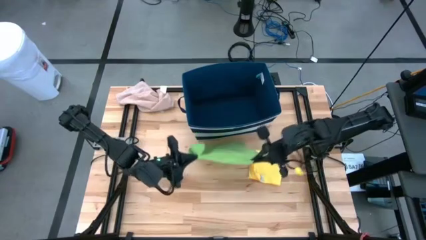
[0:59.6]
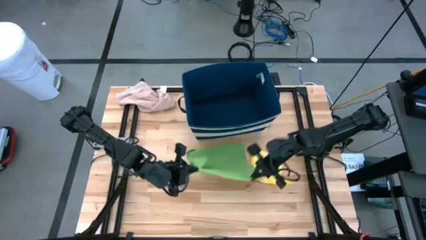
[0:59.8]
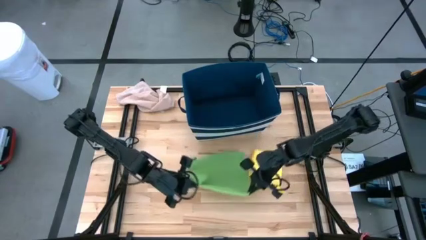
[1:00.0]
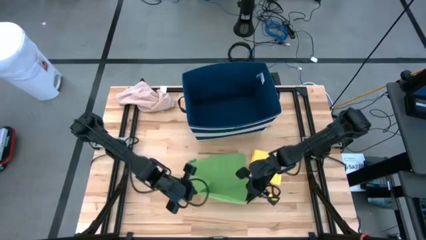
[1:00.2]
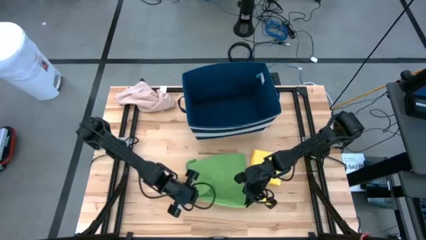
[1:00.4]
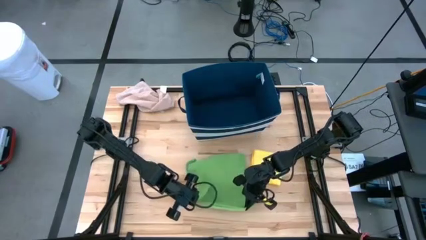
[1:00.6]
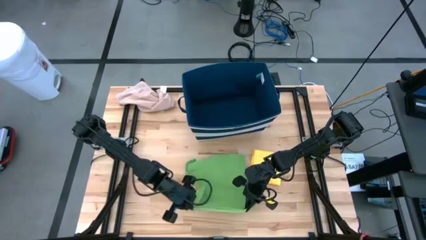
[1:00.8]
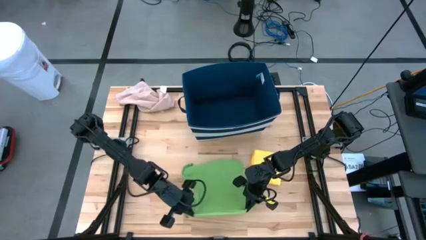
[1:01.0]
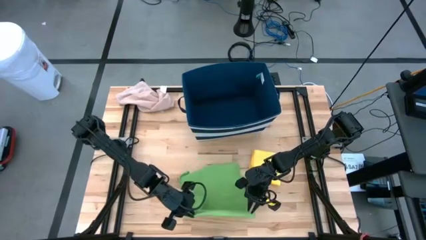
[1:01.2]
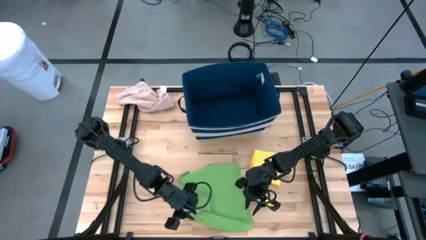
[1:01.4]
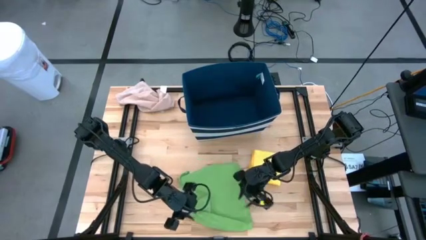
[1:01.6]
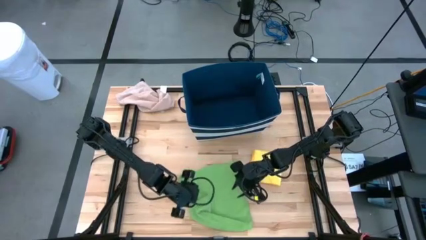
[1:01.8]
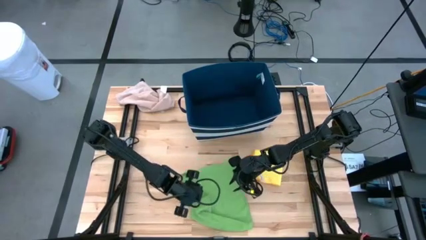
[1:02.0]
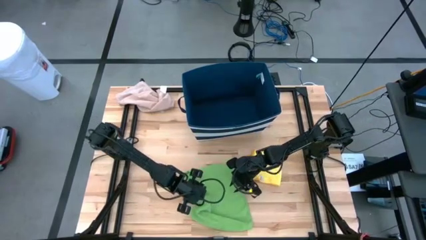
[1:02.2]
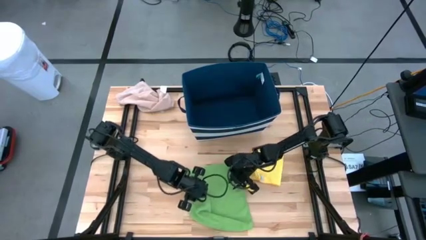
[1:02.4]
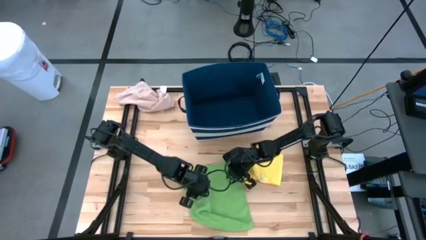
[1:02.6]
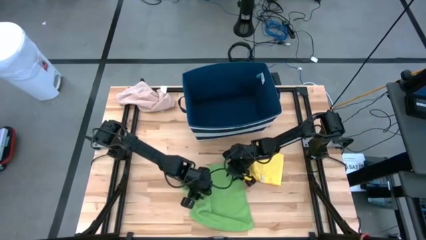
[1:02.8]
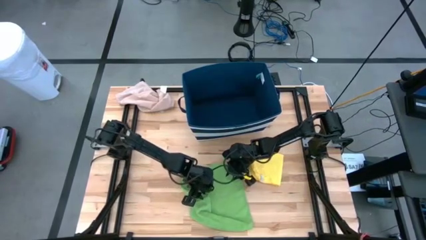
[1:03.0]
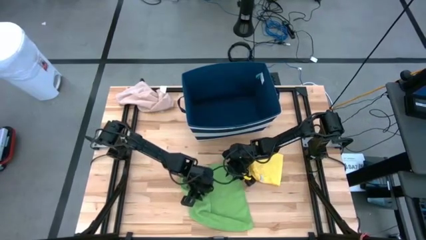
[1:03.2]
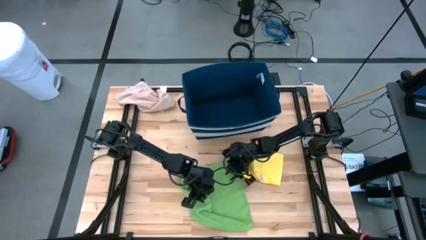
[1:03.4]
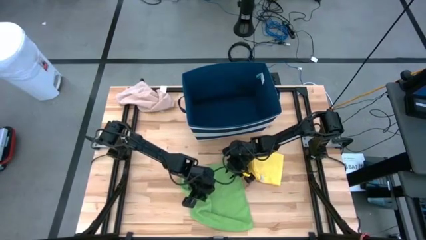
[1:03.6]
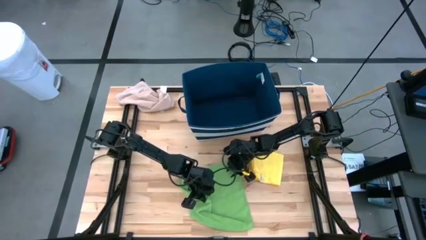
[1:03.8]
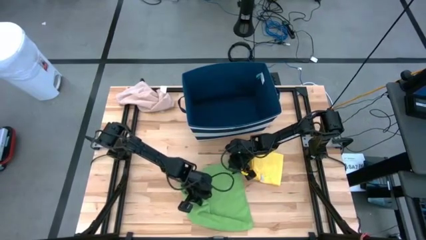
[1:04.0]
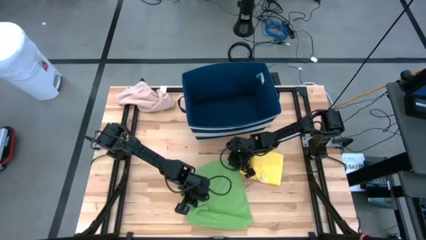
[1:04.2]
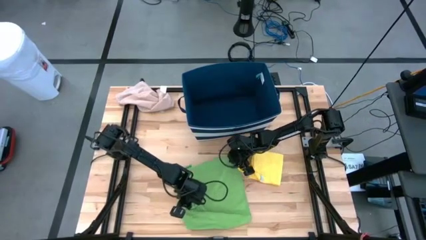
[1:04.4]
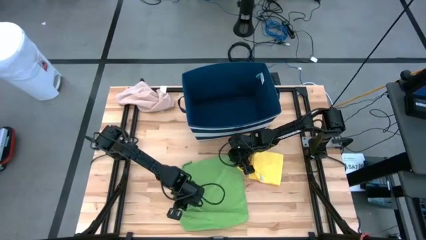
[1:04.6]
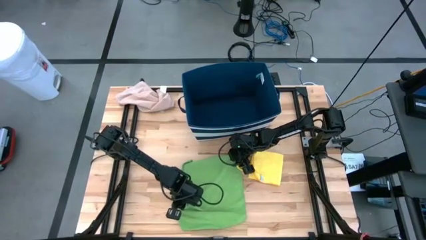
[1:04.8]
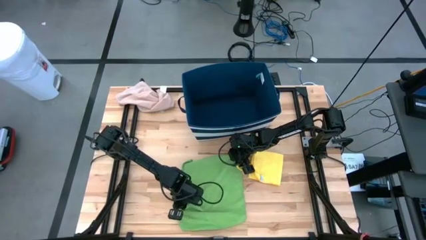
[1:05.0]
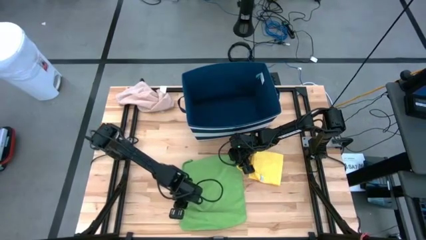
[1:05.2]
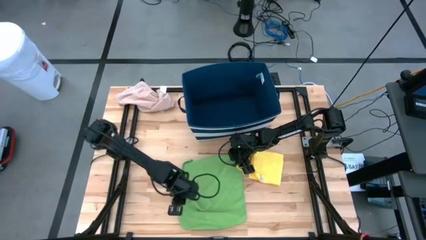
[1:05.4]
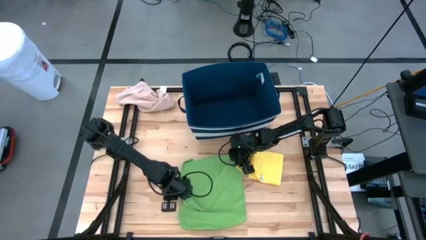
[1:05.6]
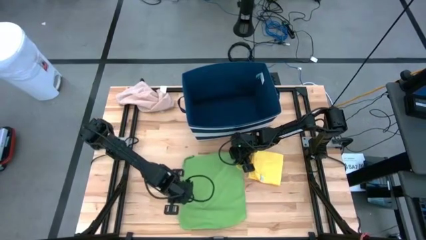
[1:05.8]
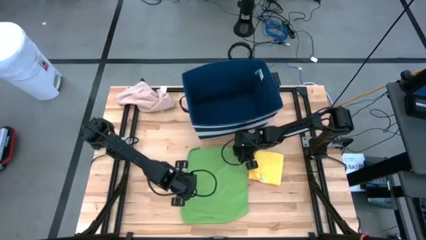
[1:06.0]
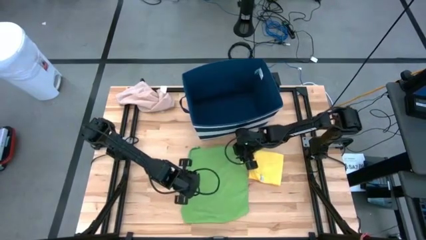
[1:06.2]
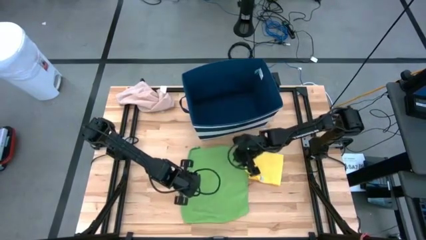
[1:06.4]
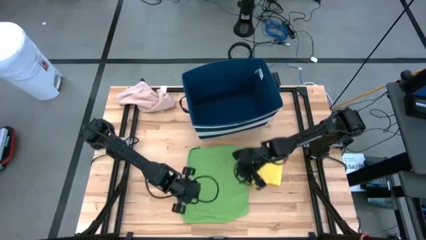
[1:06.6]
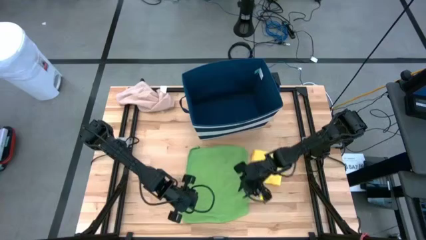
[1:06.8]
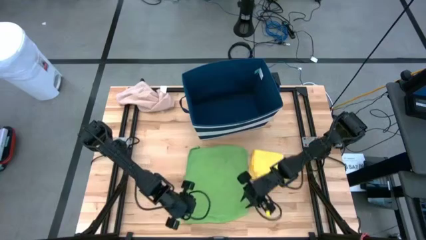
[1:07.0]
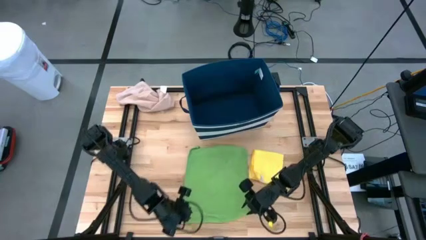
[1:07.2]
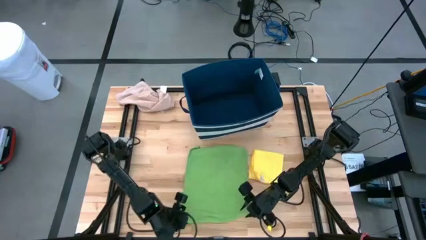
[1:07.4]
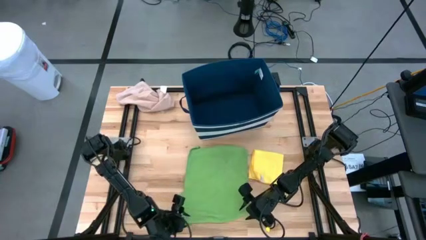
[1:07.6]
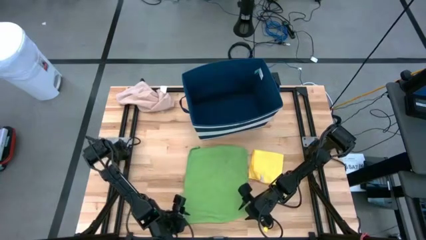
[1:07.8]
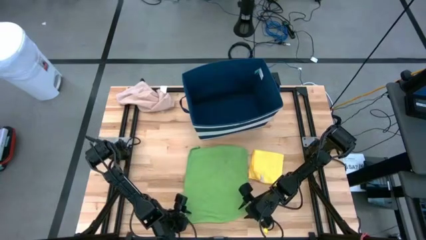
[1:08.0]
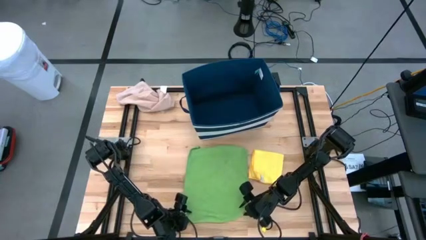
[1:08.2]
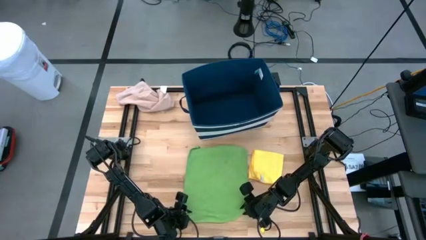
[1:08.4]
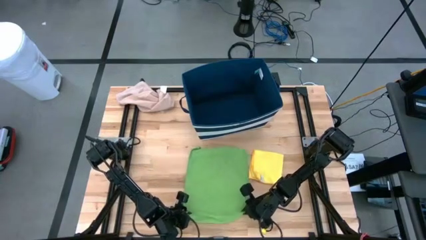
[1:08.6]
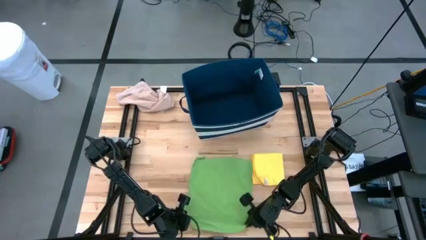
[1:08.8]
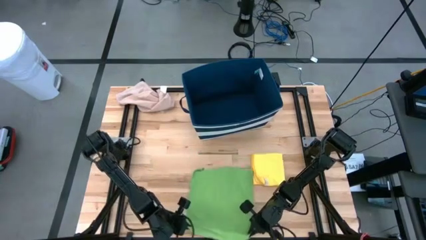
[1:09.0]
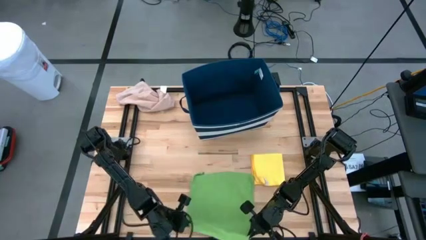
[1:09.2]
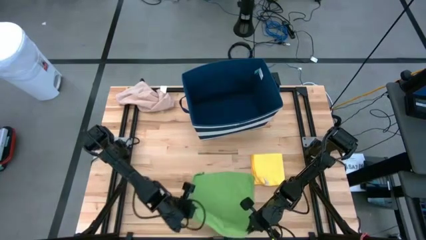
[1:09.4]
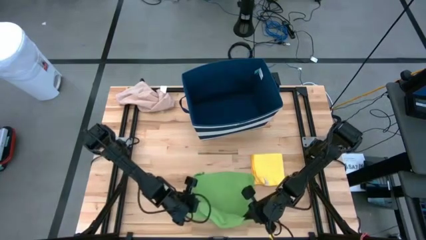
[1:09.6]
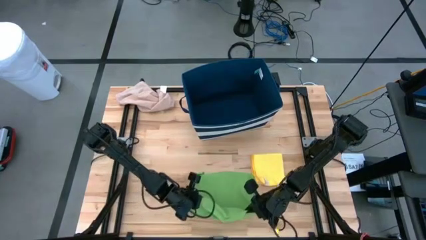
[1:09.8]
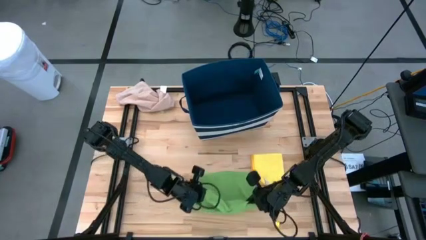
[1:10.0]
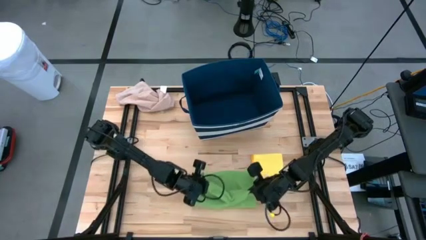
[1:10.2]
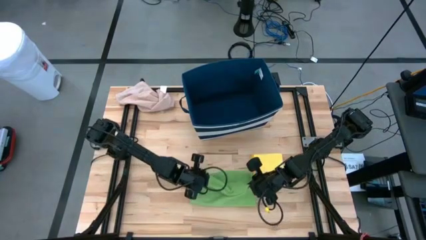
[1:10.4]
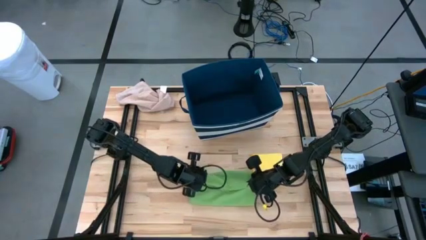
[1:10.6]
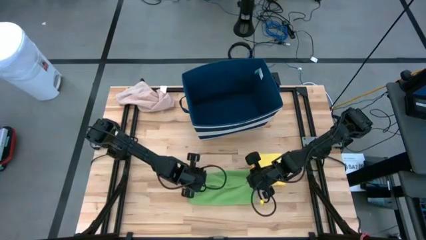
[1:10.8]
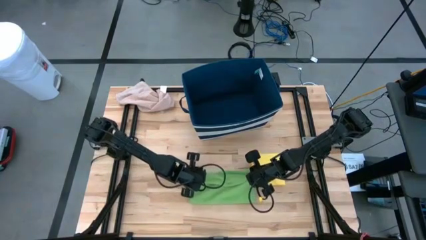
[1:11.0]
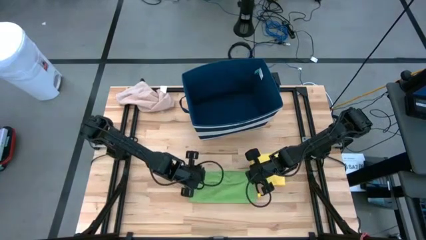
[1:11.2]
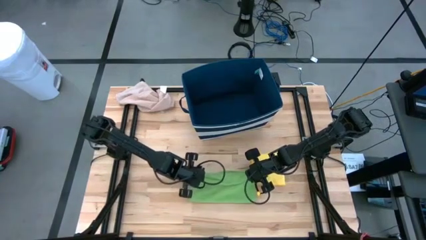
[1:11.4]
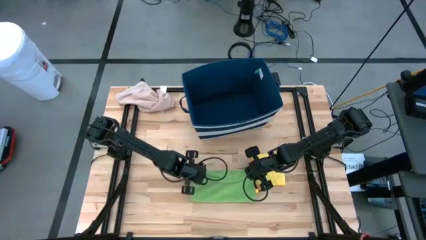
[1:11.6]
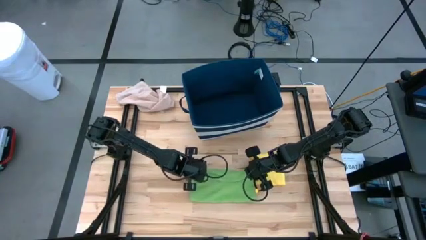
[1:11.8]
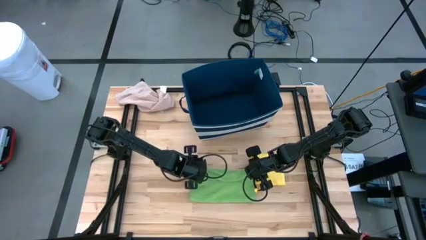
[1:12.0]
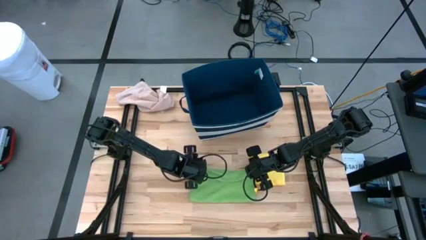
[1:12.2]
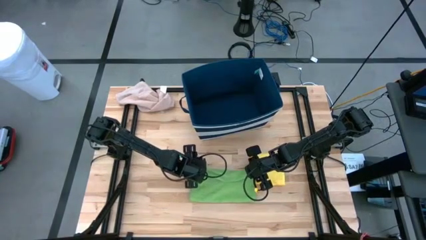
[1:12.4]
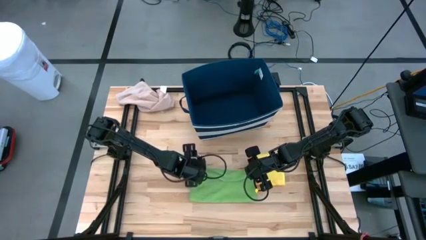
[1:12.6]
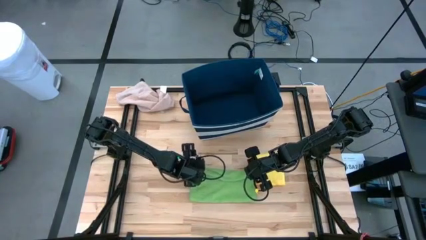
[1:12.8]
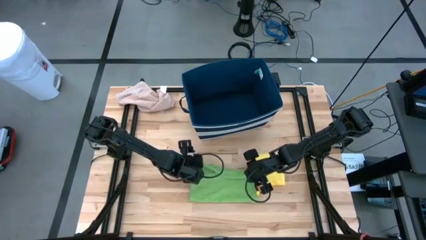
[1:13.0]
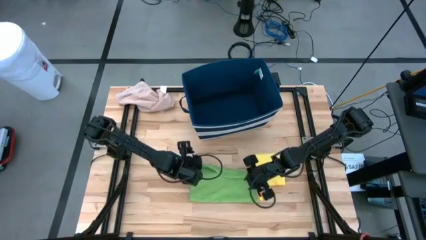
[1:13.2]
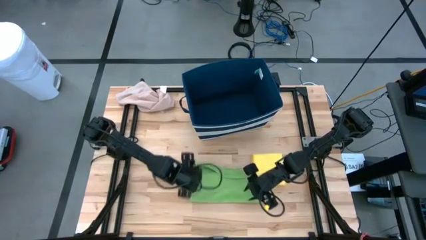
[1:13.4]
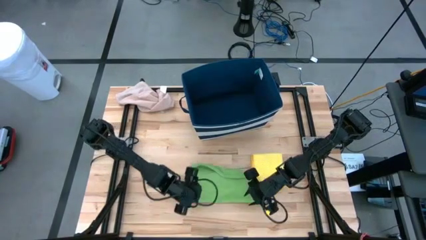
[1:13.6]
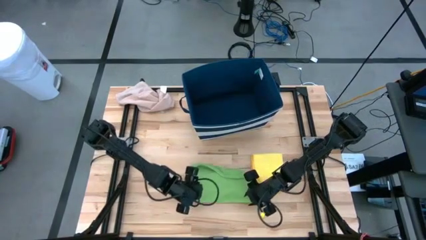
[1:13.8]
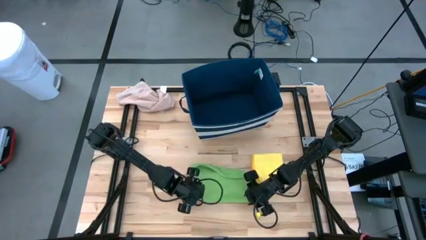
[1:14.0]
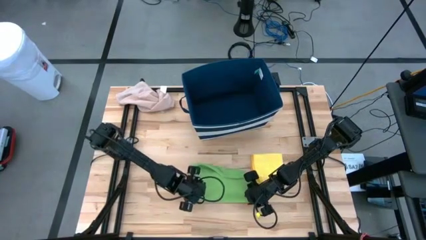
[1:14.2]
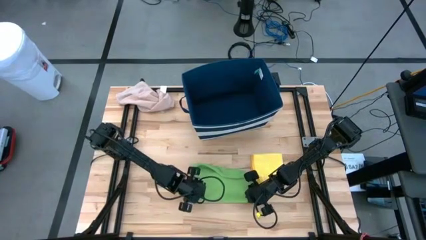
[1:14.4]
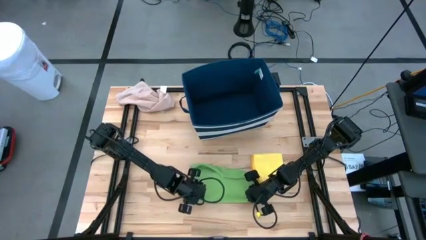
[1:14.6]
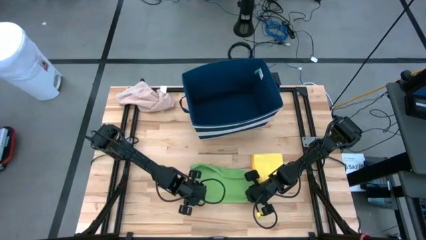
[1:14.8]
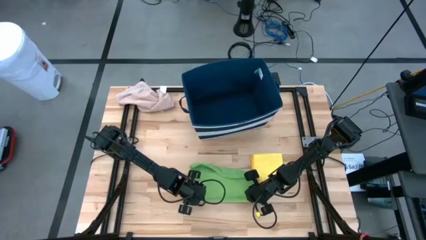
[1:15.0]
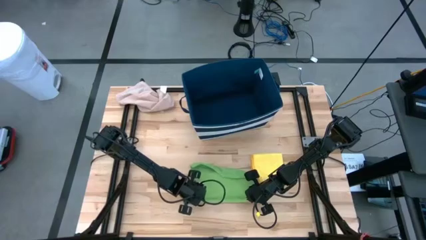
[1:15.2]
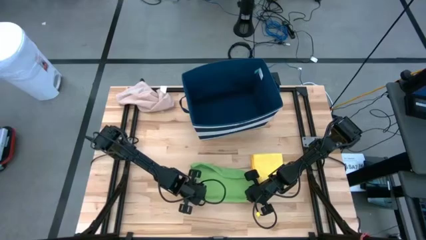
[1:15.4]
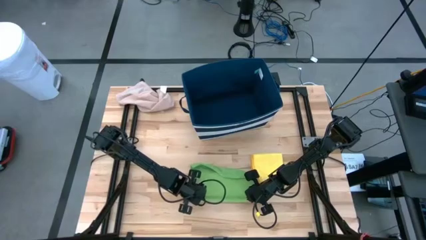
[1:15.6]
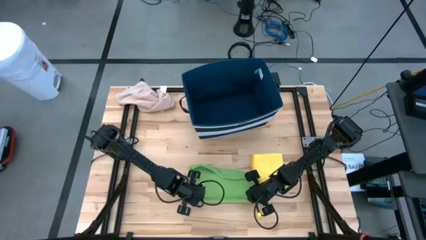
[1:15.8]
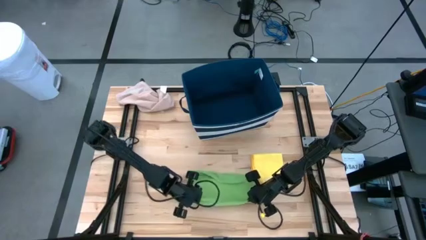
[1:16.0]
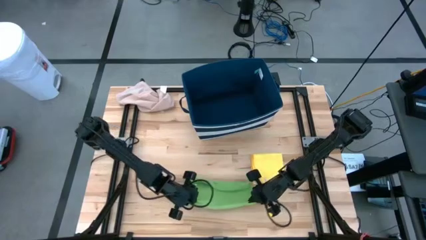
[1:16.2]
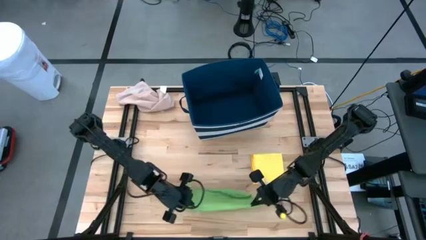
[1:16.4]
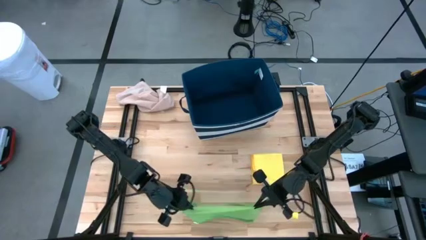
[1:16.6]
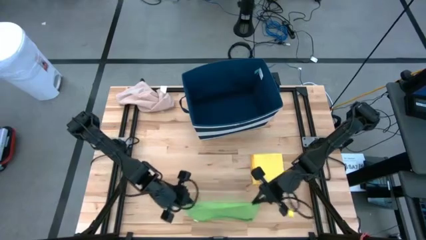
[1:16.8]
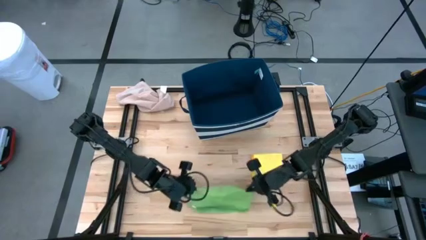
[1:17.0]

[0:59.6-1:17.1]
Task: Fold towel
Fold the green towel
